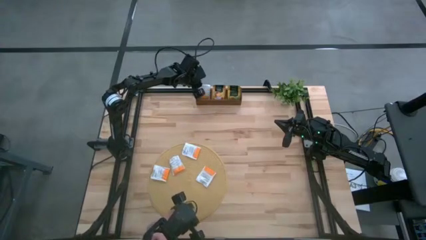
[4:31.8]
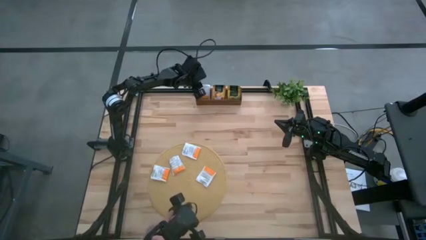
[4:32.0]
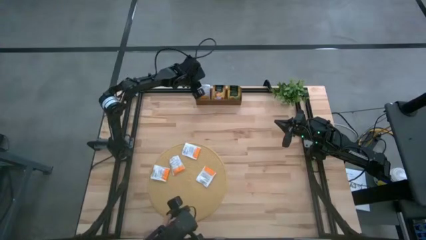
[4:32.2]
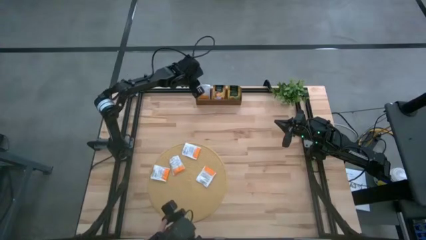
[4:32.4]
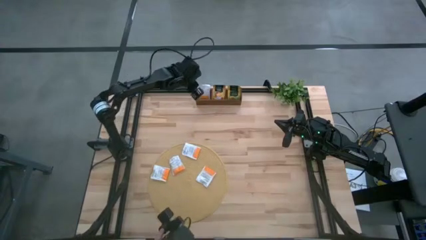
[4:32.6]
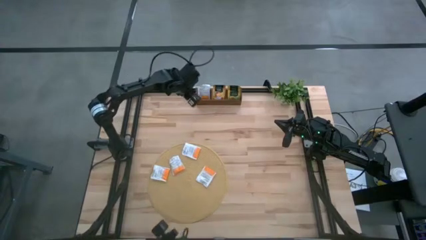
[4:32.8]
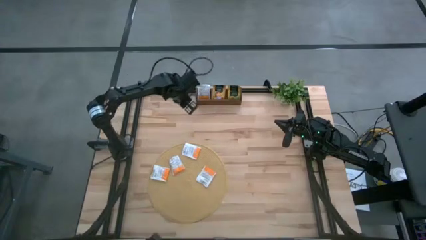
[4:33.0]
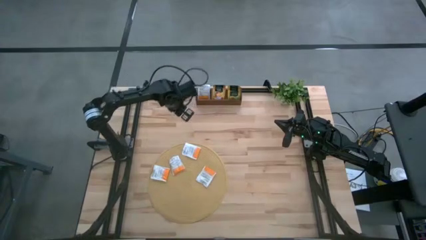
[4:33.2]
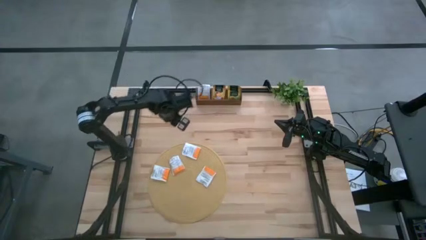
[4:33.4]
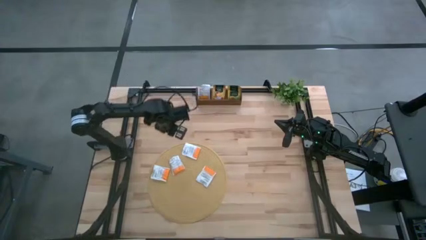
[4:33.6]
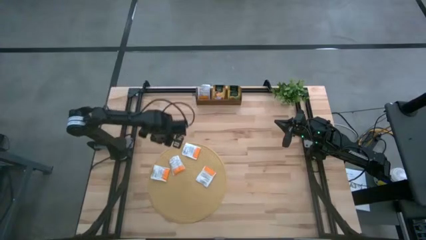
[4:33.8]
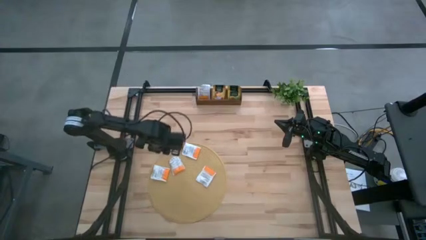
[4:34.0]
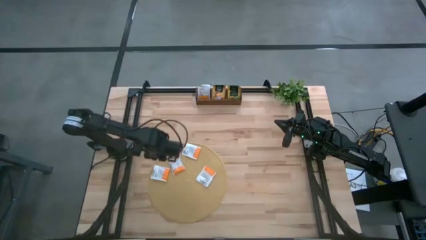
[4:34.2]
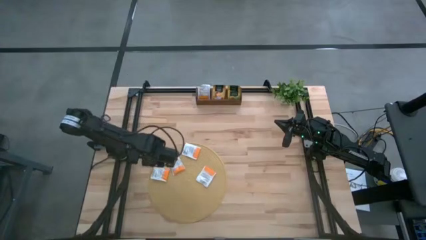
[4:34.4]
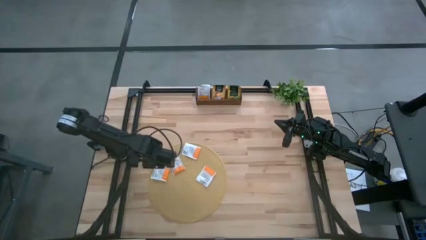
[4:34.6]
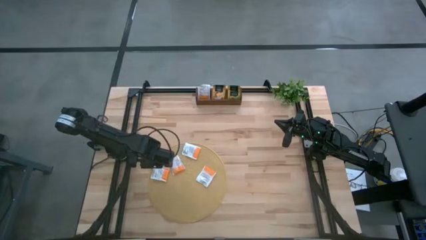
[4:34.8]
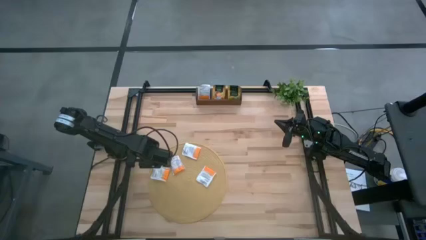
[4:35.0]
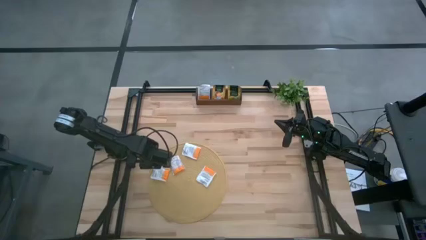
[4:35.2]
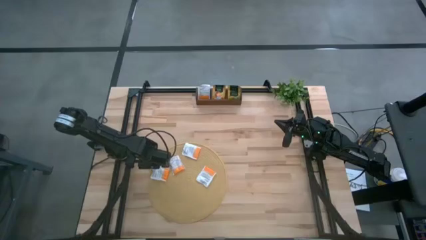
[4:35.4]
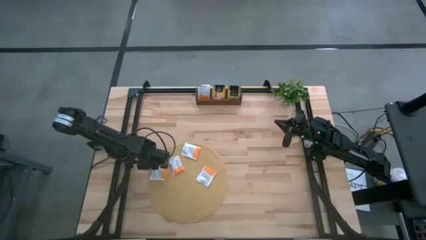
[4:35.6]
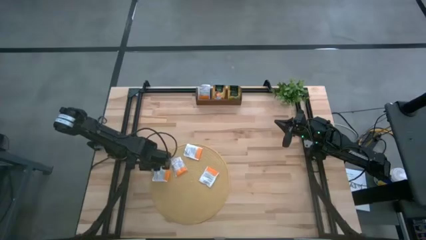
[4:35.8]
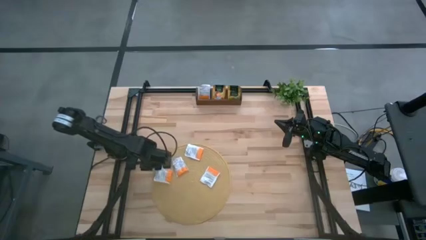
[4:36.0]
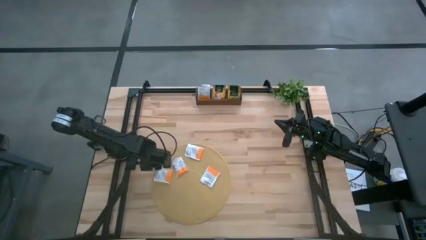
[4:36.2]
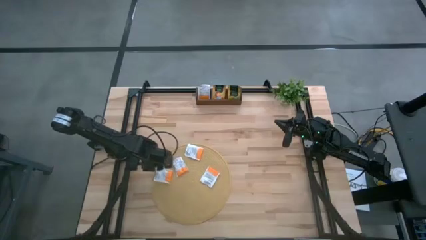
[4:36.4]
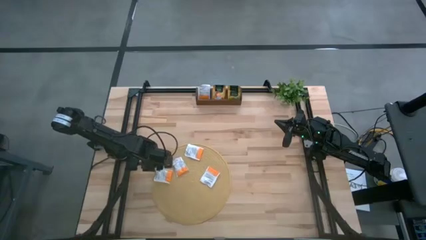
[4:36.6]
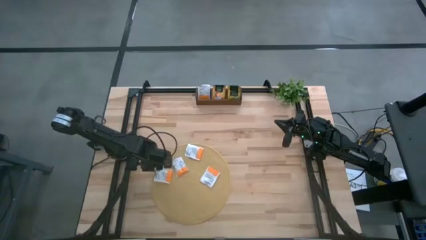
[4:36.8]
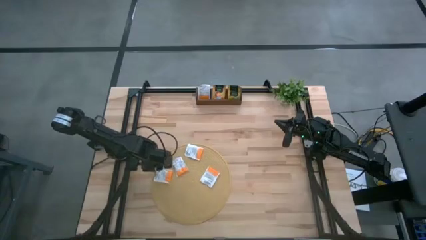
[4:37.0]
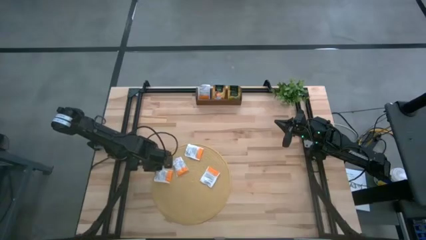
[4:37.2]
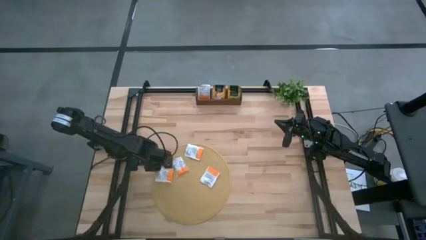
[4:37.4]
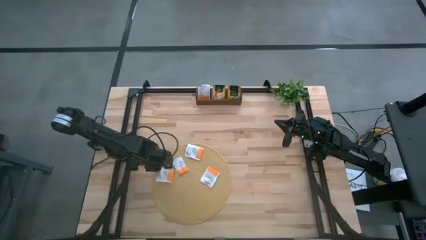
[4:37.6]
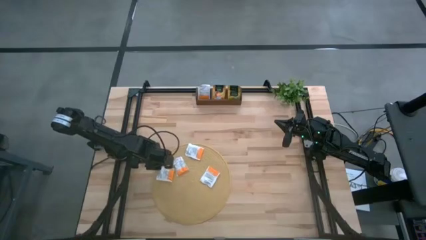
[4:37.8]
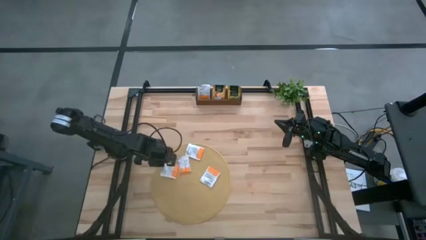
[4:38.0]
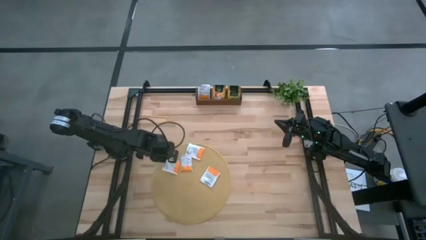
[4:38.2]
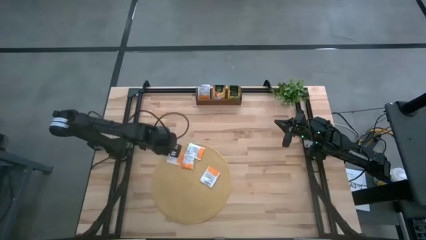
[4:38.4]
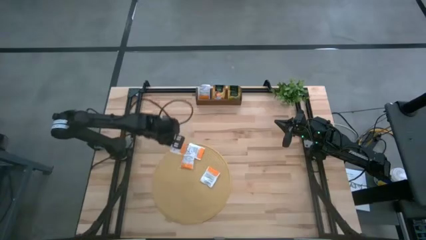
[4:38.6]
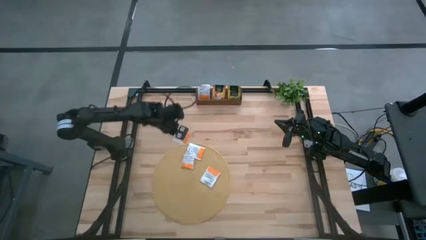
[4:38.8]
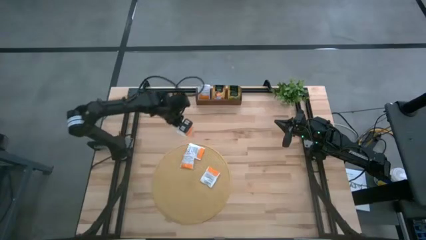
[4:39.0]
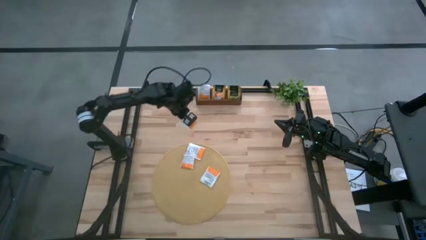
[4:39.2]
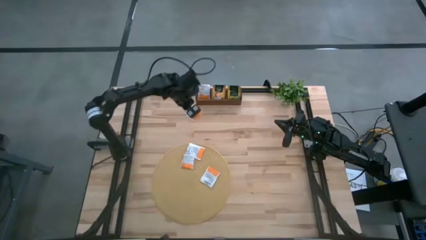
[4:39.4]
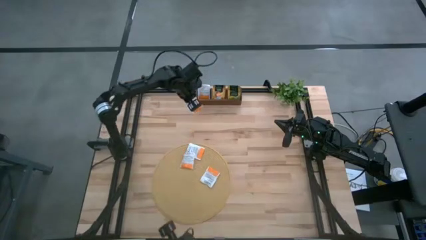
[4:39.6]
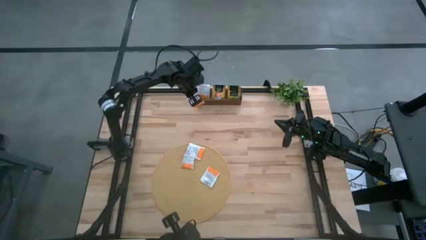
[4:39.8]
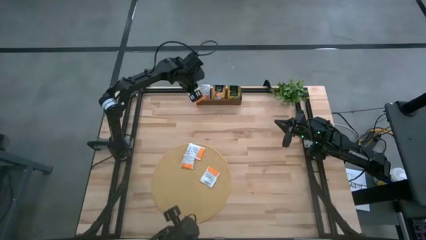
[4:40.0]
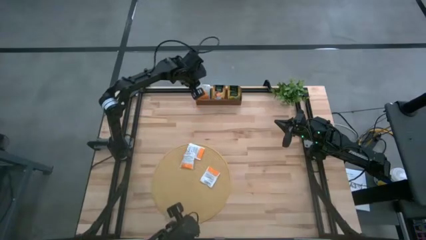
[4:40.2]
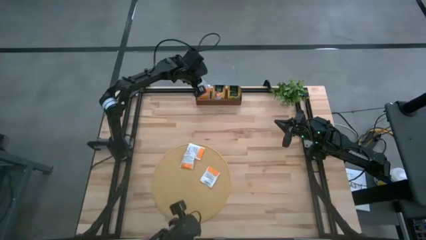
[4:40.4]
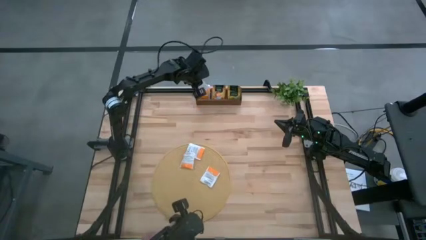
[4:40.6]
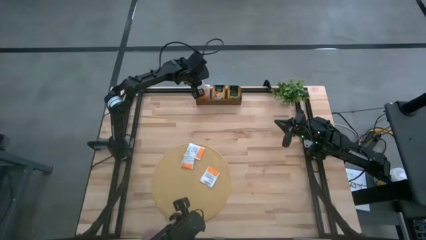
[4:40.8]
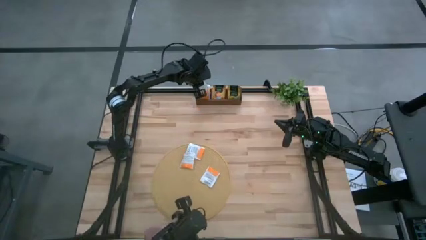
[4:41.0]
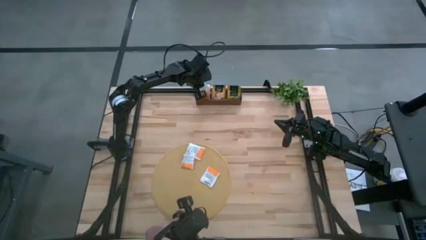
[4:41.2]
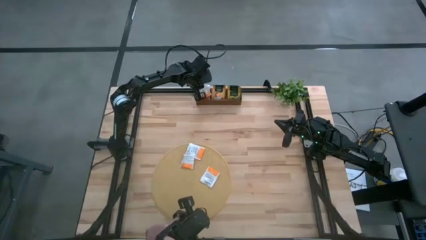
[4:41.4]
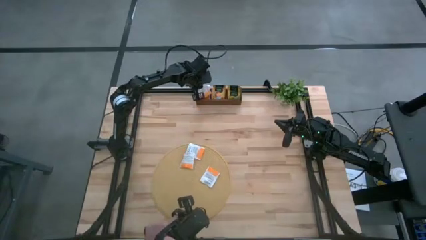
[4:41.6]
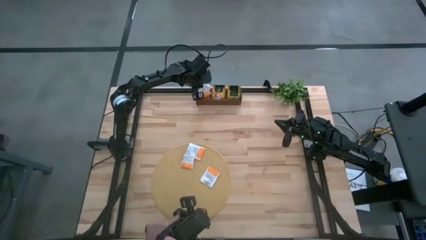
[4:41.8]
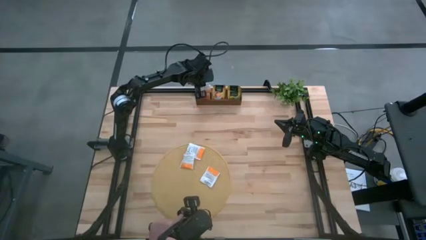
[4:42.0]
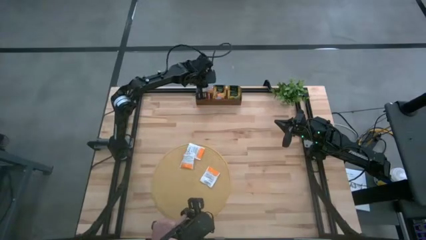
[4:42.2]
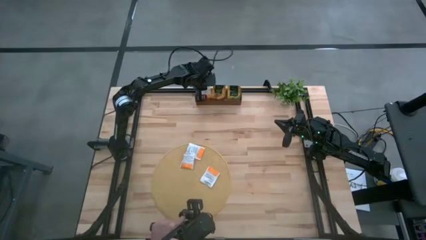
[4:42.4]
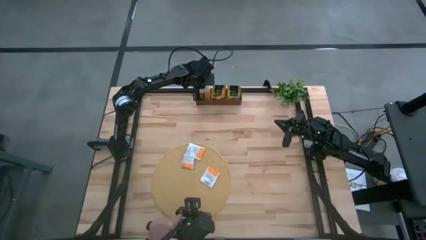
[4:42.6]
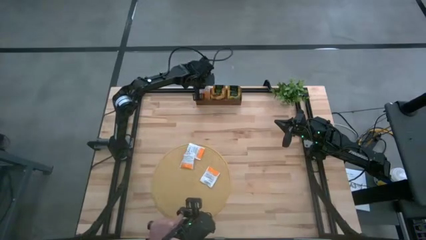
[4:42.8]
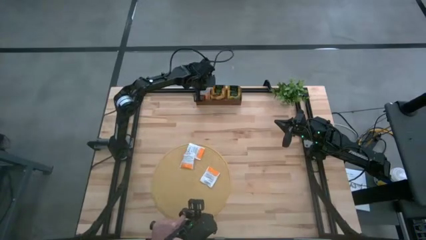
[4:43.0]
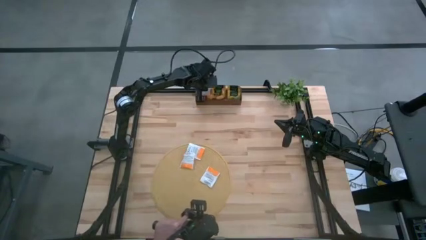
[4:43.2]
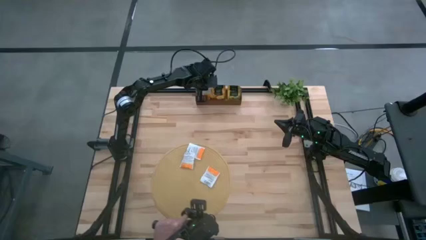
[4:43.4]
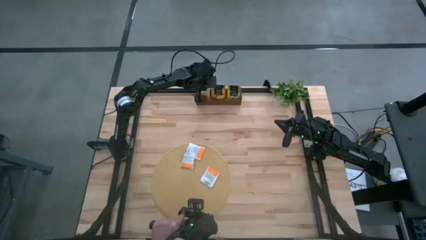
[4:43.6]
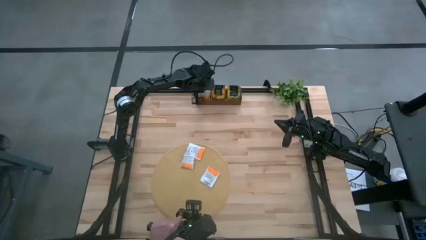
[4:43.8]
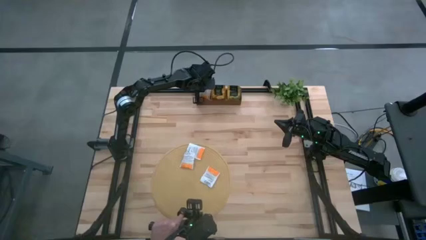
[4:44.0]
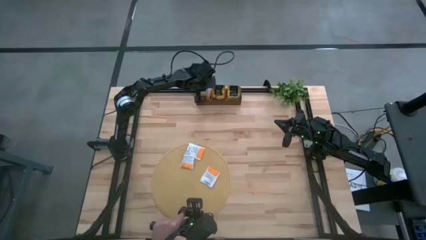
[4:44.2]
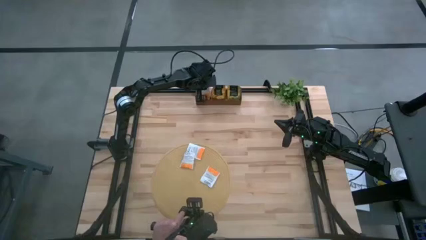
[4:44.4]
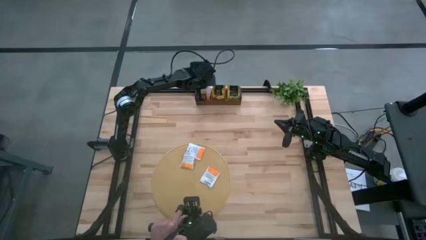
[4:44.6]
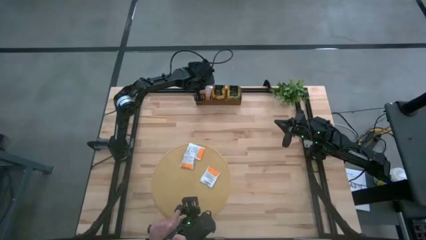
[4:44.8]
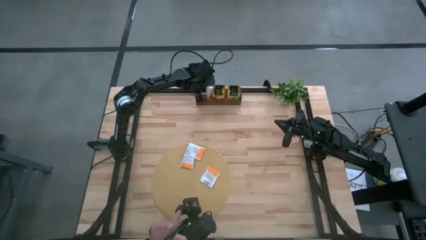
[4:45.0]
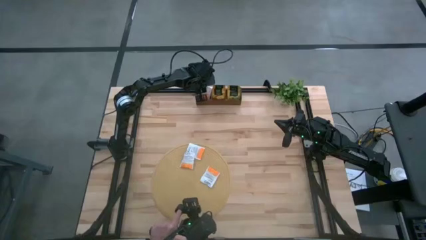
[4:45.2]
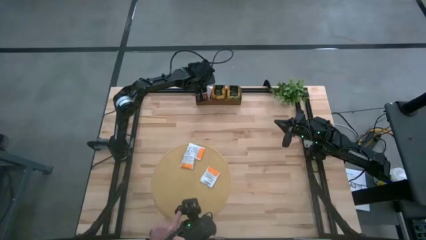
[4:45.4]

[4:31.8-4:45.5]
Task: Pick & Place Tea
Put the white tea bag into the left slot of the wooden organizer

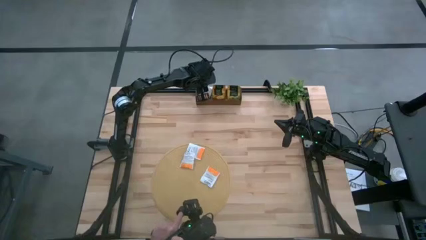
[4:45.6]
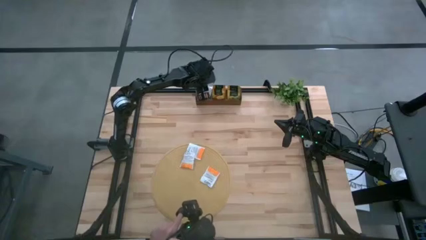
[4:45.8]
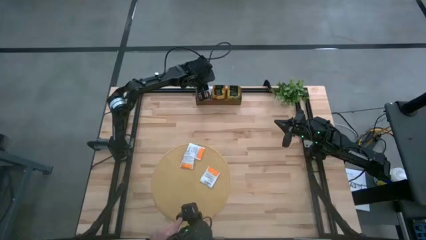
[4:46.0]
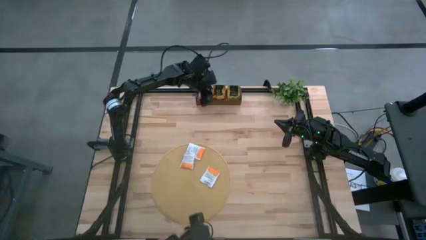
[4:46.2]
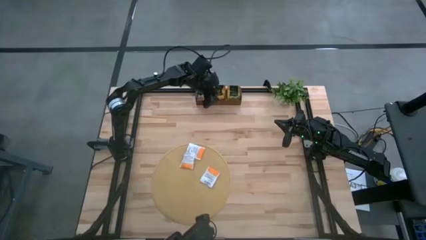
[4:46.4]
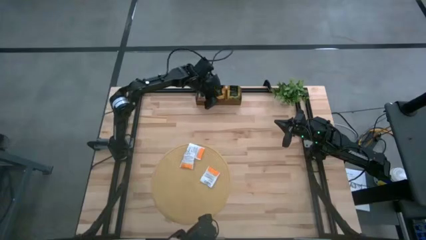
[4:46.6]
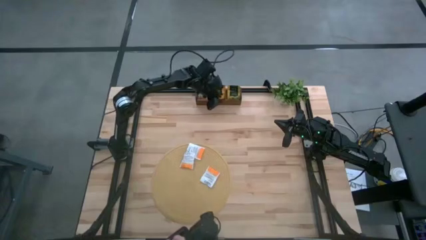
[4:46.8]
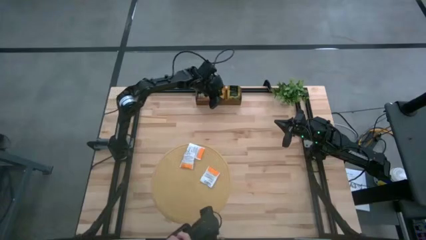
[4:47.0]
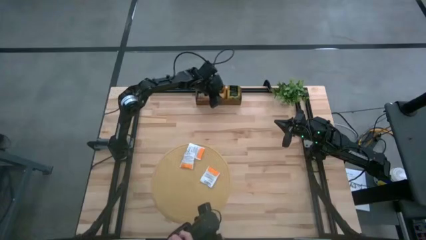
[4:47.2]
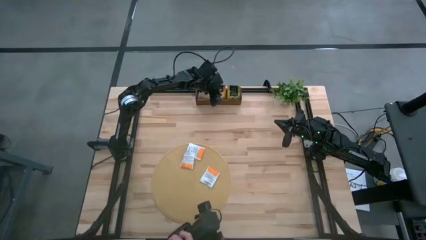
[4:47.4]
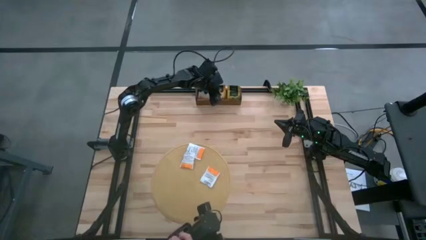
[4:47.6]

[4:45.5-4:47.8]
Adjust the yellow tea bag in the wooden organizer

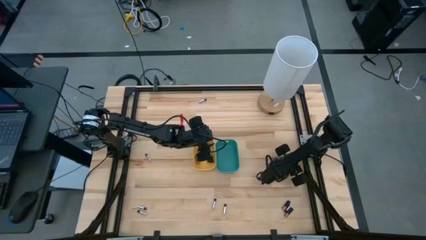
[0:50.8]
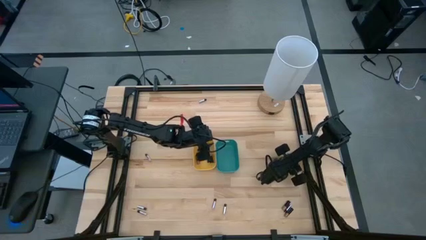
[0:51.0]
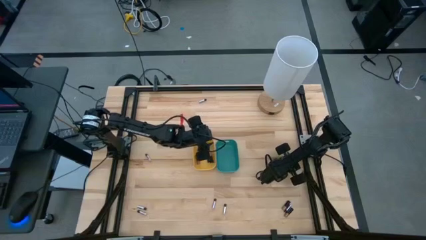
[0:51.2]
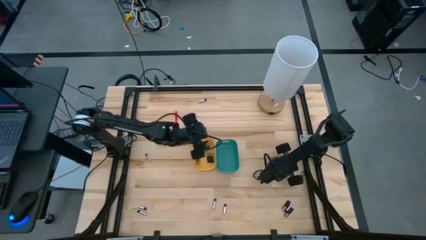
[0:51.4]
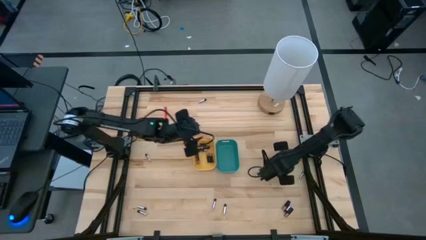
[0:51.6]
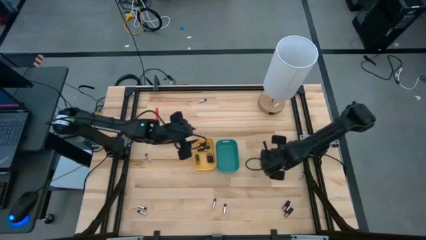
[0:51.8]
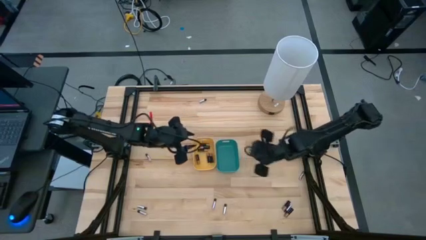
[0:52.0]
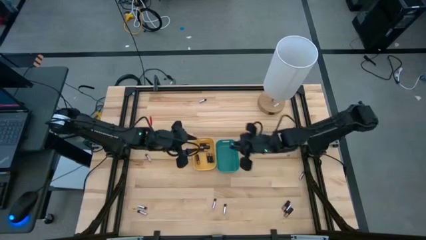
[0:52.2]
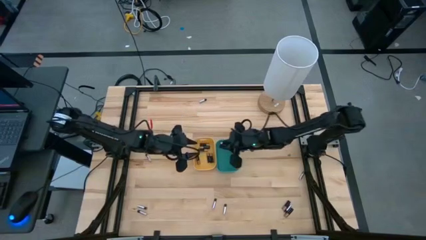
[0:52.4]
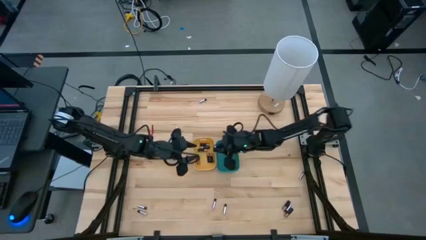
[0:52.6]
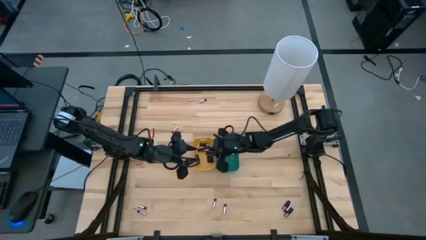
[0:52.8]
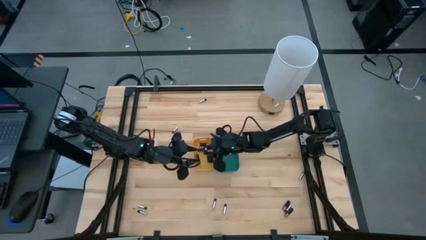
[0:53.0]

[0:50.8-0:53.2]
Task: Sort batteries
Put the black battery into the yellow bin
